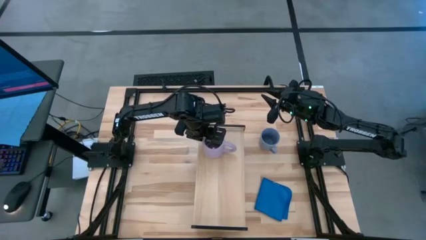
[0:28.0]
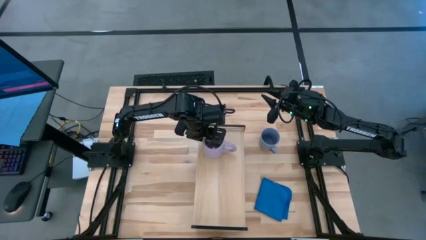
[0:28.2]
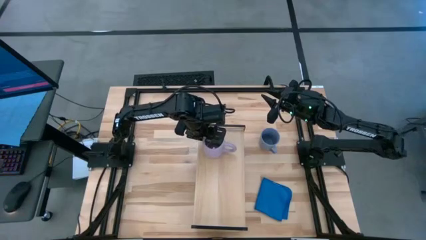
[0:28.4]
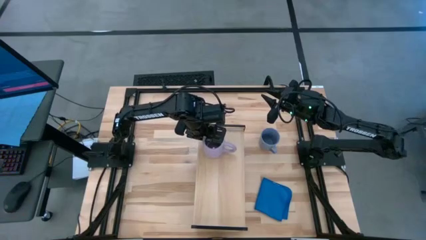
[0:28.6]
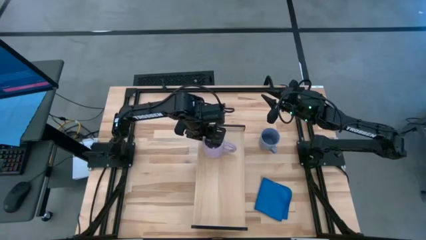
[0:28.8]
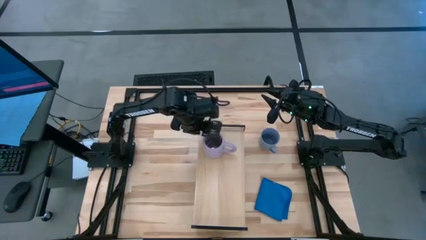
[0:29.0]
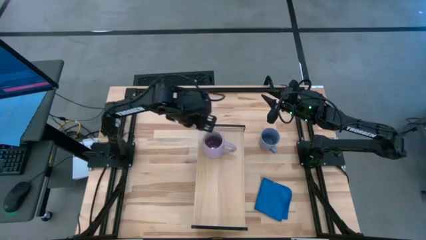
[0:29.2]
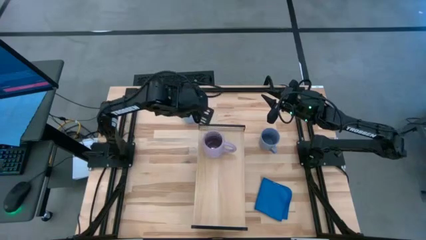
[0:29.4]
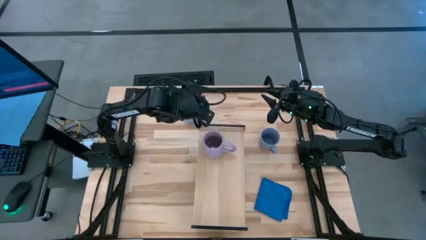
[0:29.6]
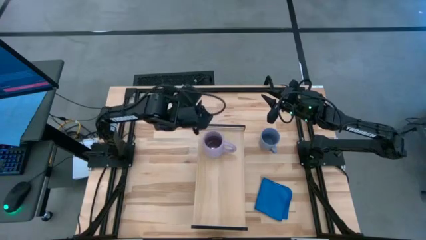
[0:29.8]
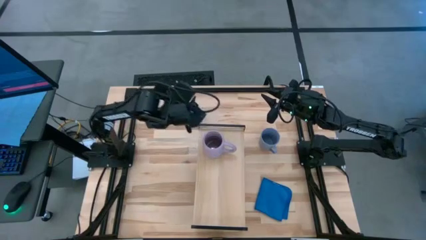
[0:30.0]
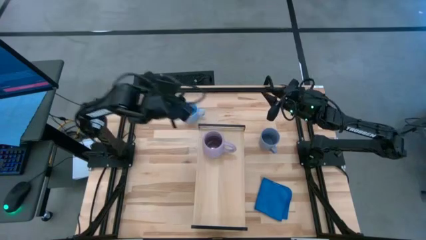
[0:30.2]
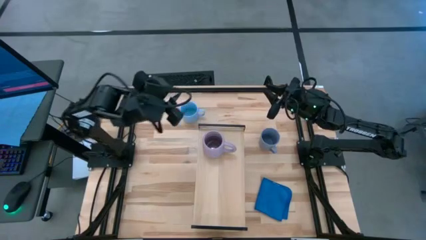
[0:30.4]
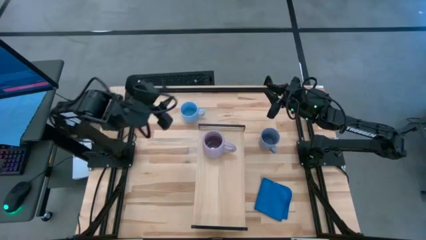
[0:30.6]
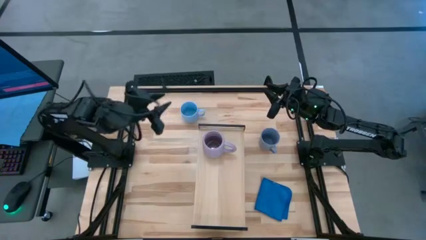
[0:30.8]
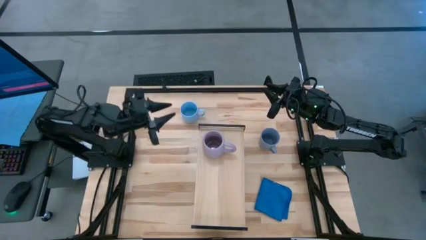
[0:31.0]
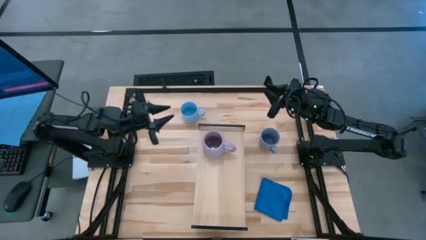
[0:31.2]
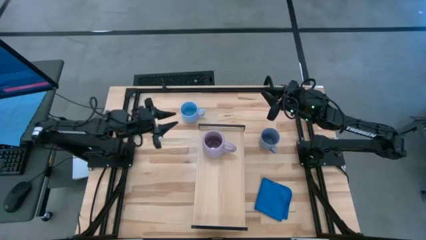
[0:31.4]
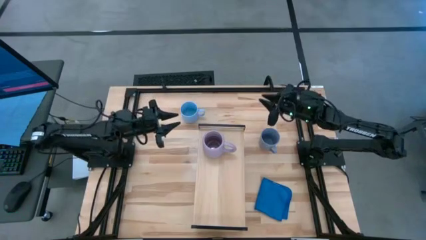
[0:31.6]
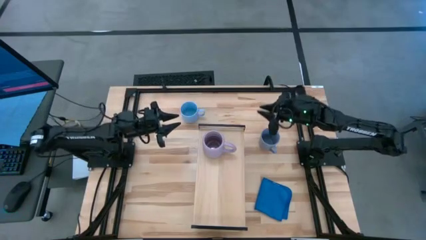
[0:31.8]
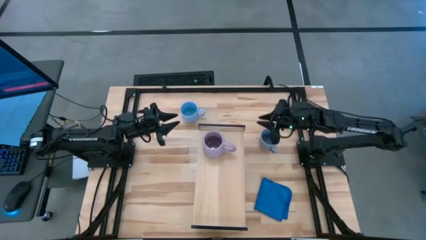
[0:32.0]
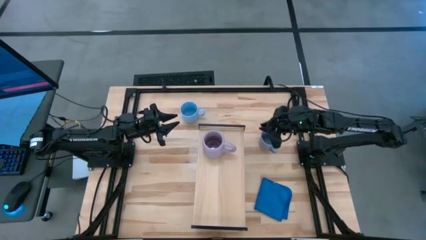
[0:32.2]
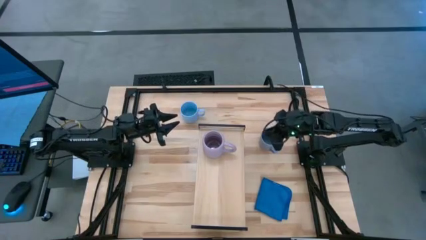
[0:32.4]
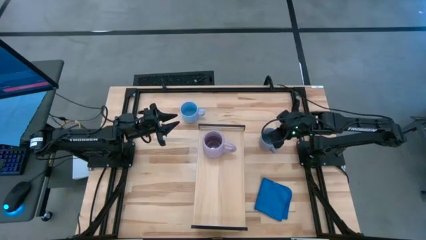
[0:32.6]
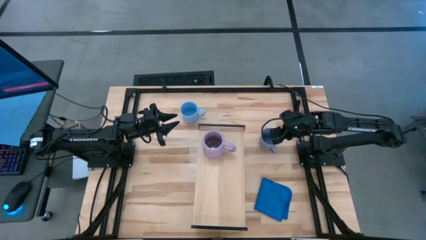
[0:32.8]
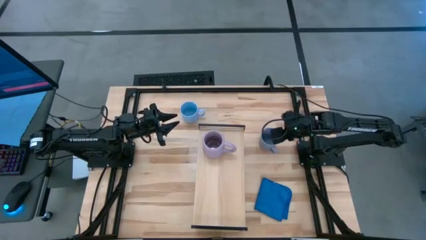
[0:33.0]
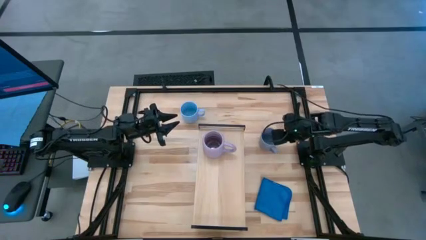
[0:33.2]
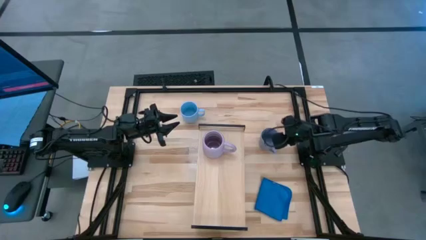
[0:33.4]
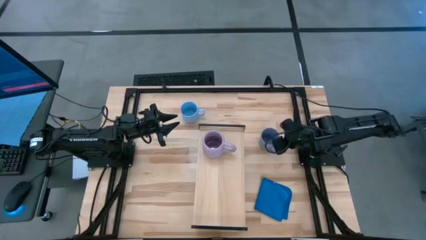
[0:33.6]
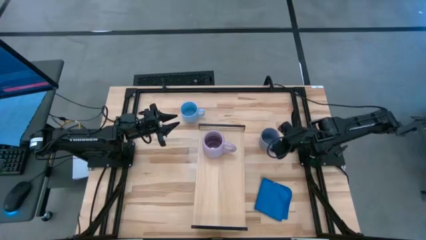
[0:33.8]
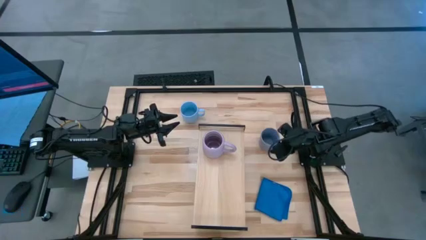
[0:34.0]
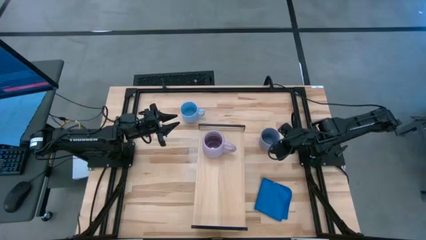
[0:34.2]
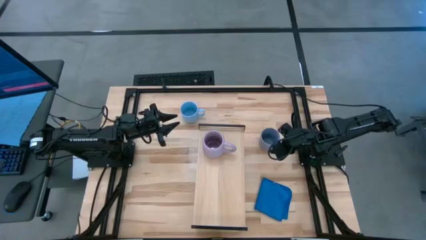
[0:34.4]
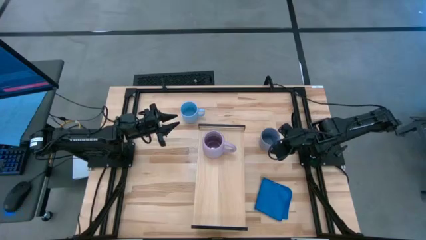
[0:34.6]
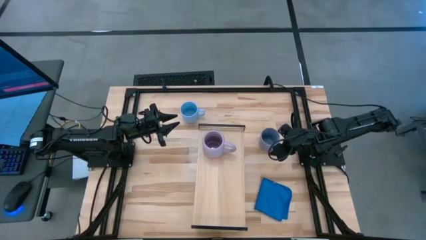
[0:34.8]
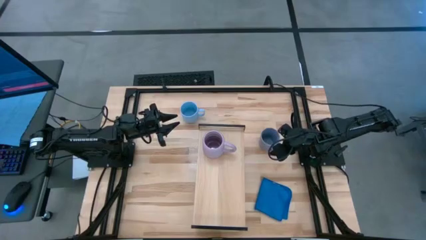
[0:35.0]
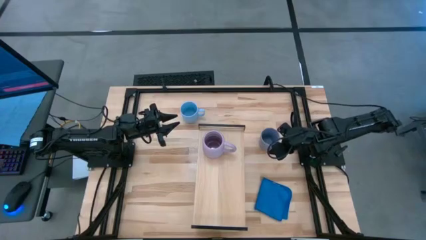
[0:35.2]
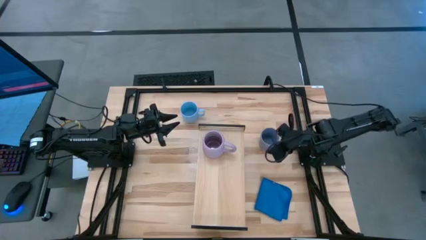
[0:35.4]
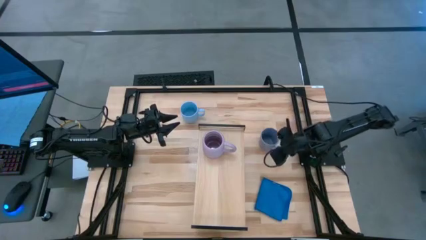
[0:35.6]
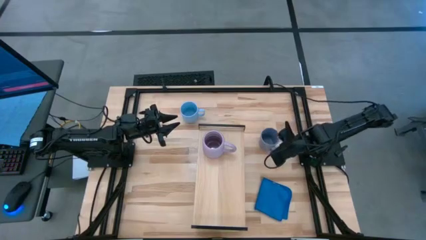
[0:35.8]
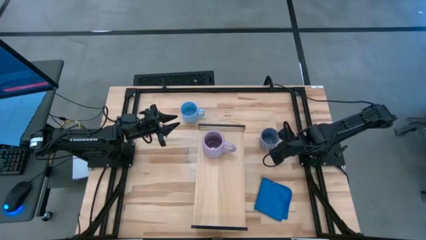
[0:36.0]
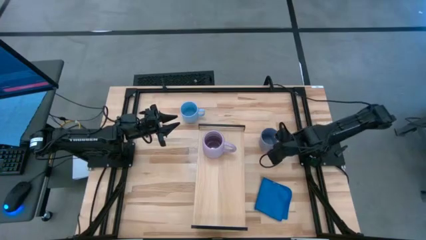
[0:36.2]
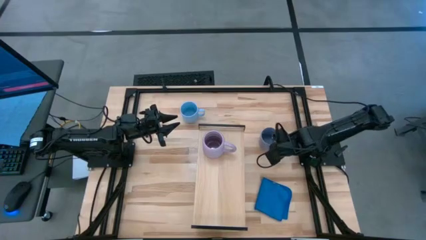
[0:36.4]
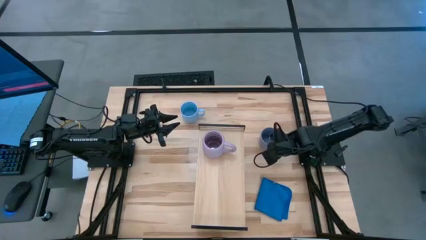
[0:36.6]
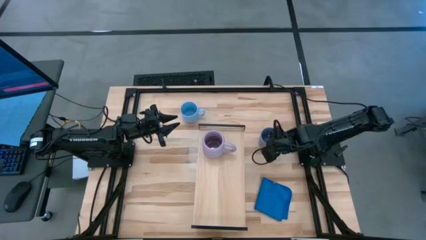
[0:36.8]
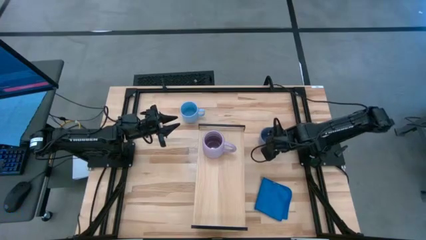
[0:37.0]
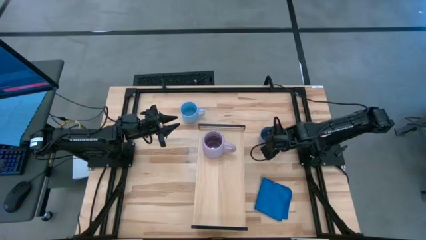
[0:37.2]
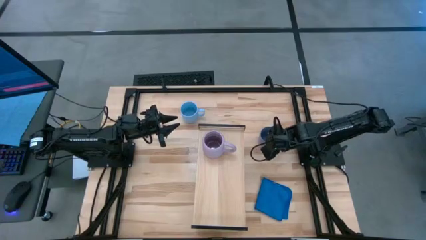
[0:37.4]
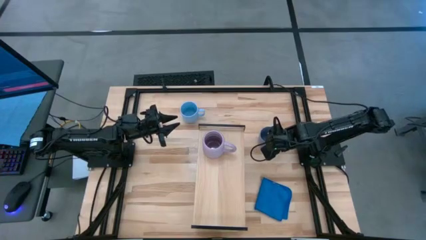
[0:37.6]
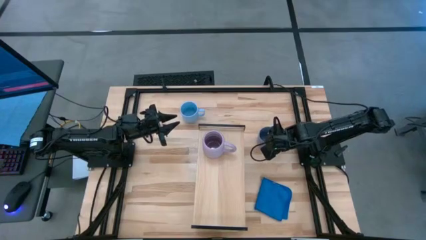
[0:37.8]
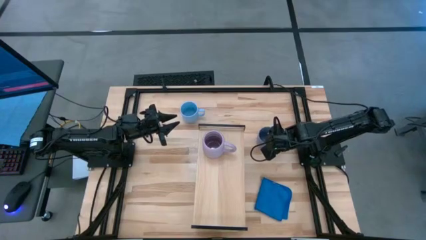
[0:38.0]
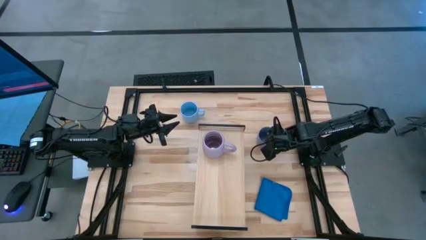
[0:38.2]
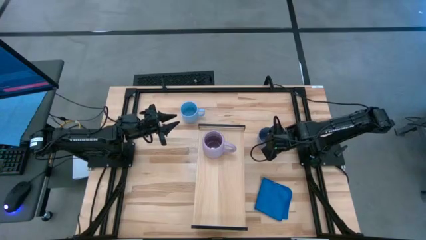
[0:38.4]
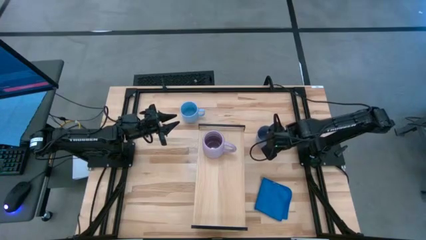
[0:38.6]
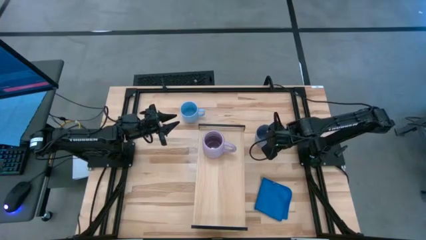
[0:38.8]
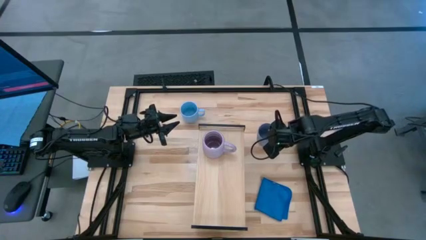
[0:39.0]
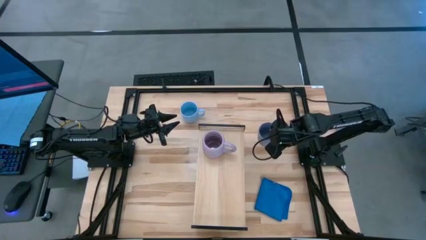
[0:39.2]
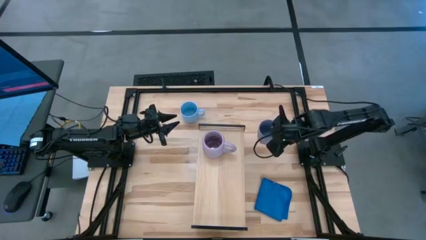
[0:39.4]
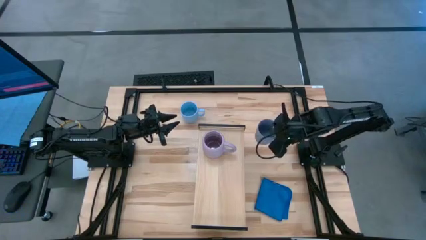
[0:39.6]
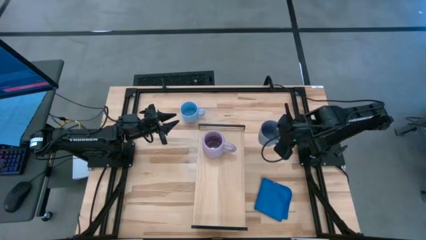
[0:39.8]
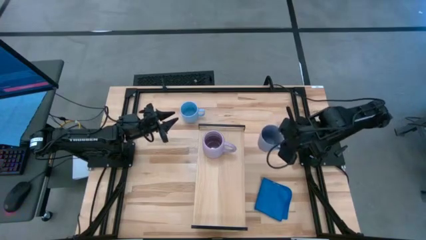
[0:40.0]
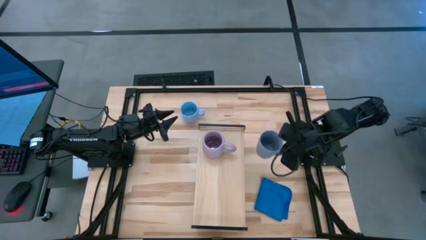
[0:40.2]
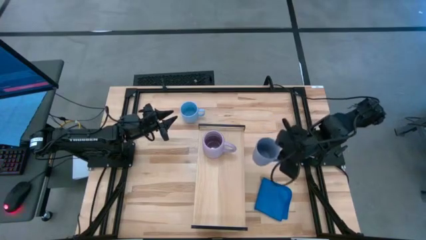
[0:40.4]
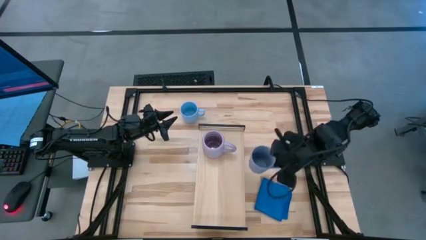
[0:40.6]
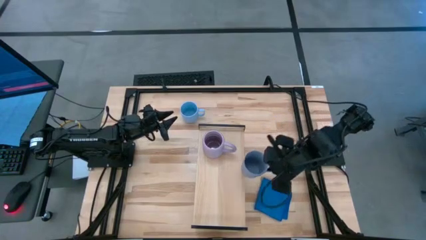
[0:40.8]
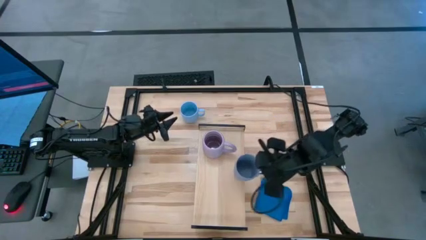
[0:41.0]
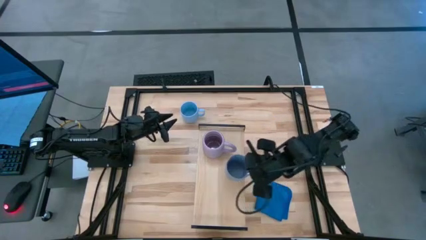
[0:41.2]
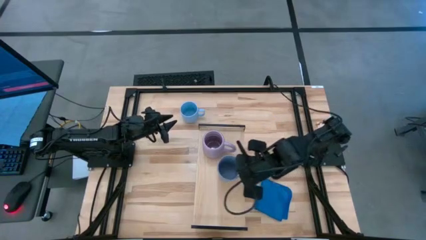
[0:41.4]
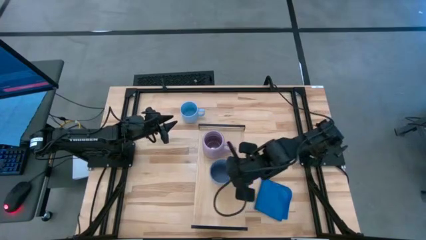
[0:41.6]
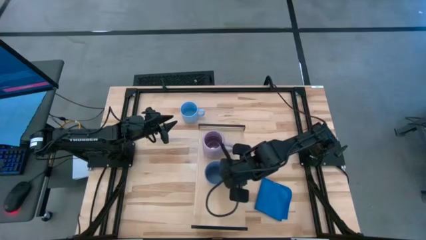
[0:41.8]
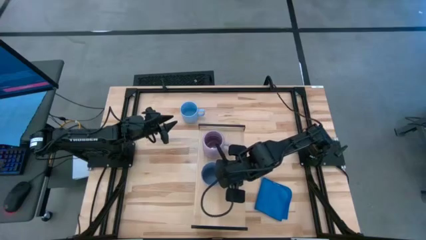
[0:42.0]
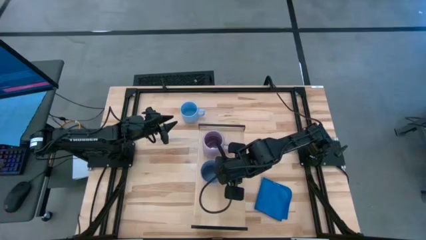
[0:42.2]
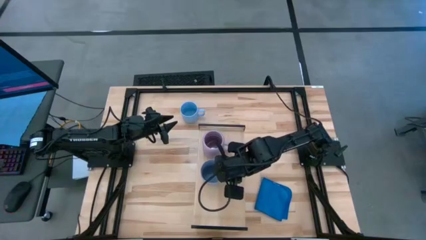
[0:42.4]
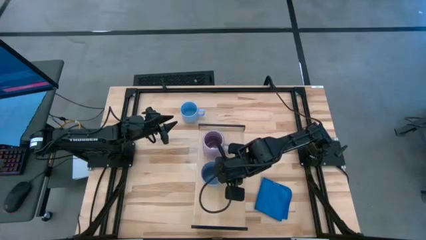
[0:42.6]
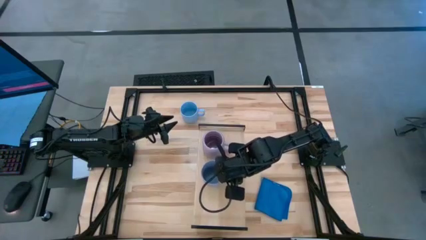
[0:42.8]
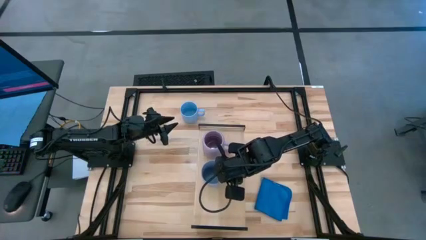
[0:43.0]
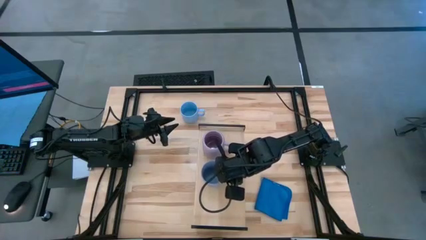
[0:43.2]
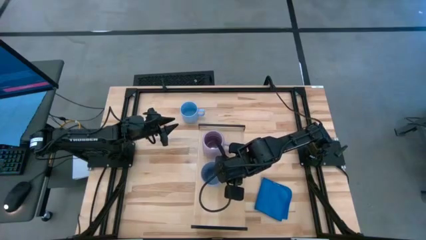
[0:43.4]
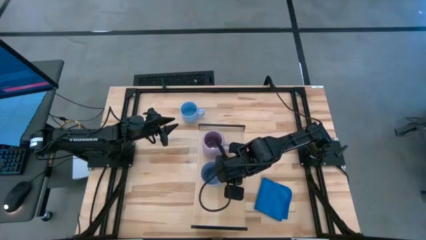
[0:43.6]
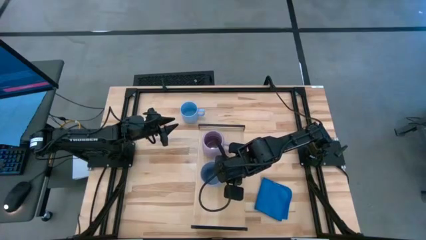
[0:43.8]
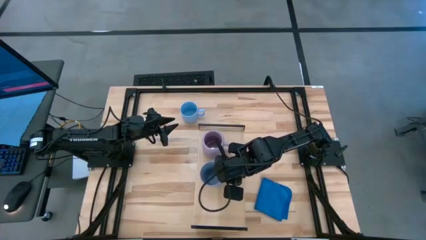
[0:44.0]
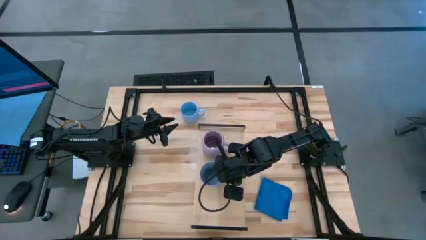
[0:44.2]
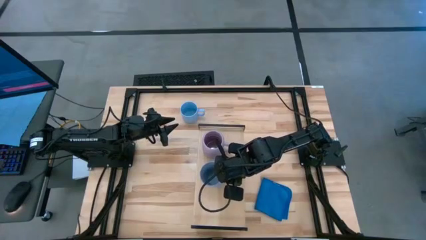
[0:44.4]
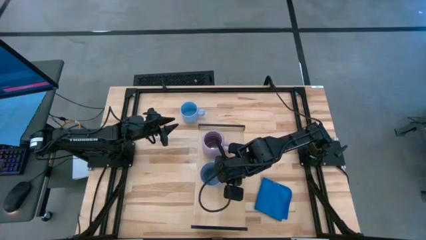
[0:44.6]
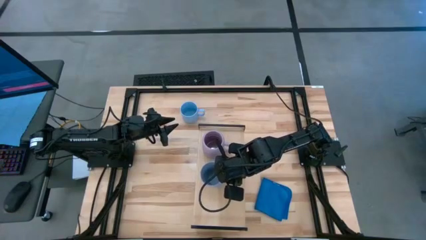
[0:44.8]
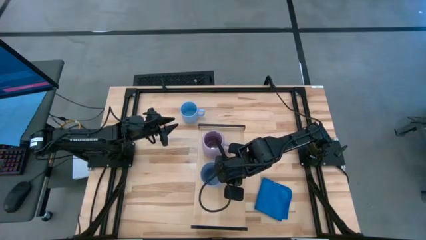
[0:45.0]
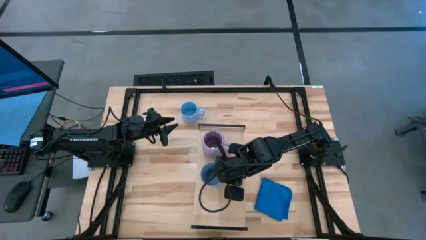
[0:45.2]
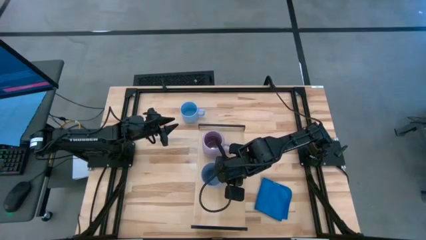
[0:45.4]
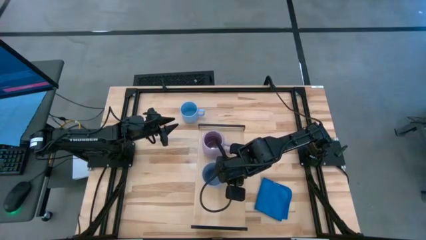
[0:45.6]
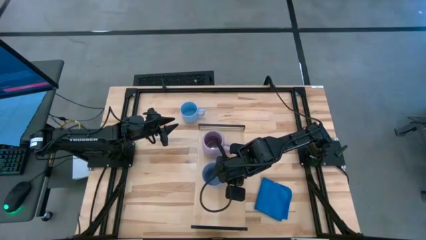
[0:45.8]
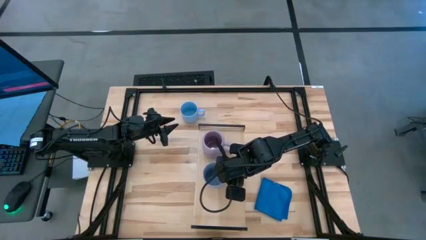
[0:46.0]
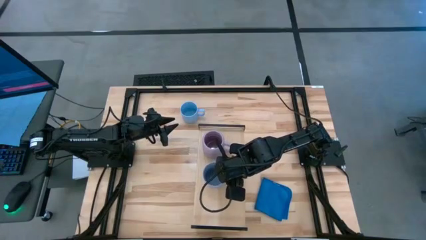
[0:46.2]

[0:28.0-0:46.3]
Task: Stack small to large cups/mugs on shelf
Put the dark blue mug on the shelf
